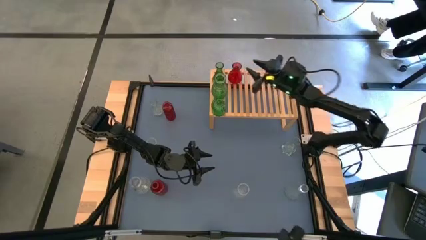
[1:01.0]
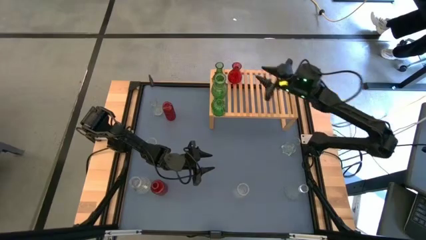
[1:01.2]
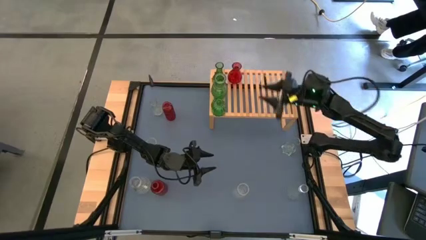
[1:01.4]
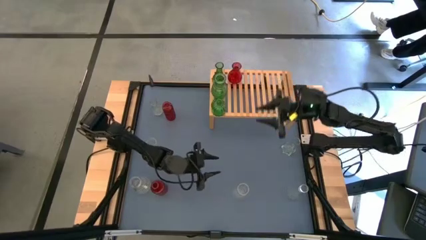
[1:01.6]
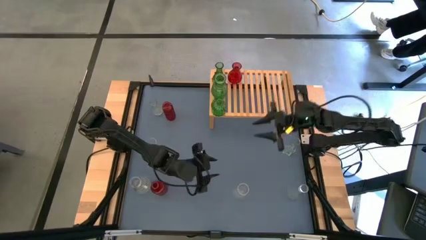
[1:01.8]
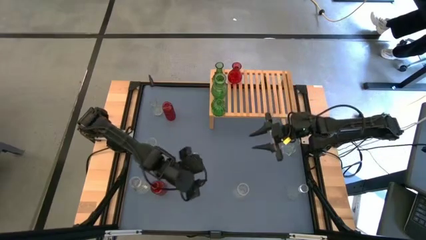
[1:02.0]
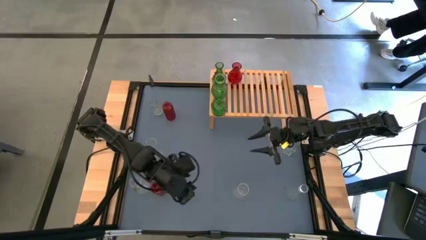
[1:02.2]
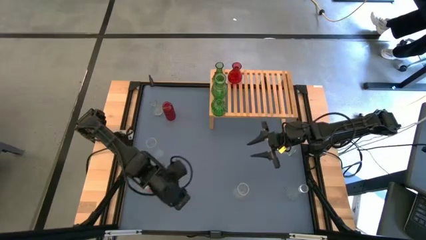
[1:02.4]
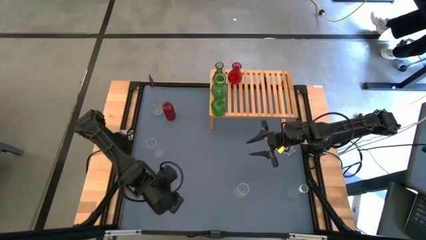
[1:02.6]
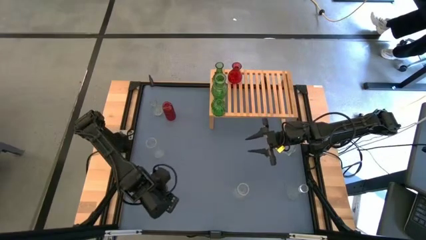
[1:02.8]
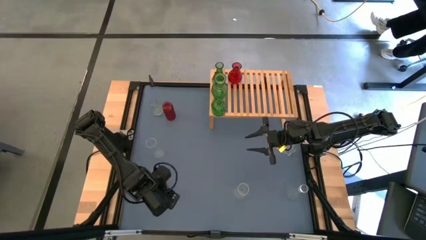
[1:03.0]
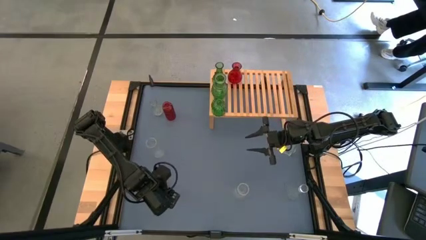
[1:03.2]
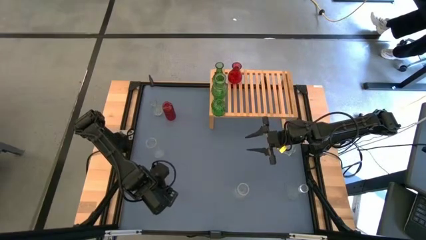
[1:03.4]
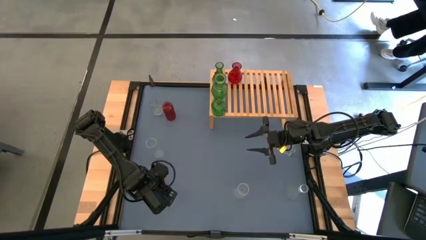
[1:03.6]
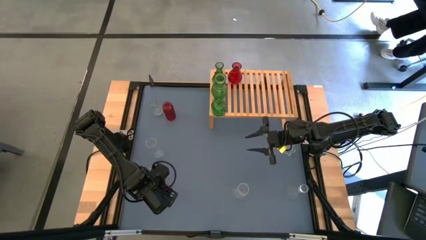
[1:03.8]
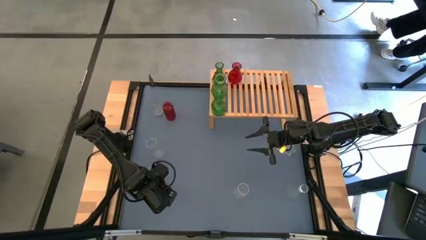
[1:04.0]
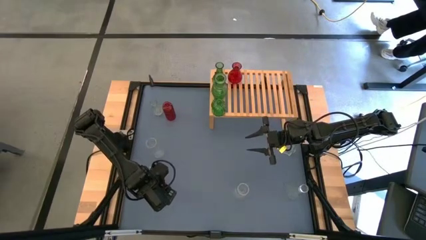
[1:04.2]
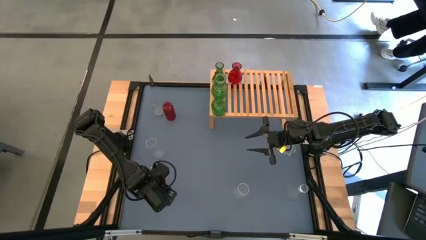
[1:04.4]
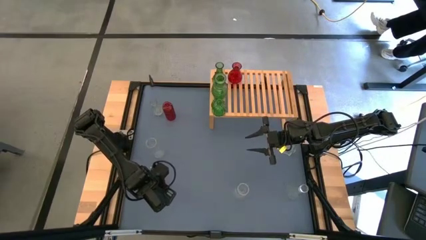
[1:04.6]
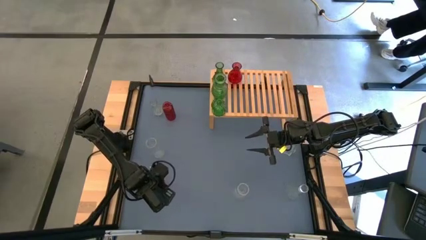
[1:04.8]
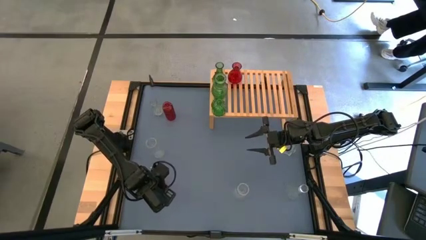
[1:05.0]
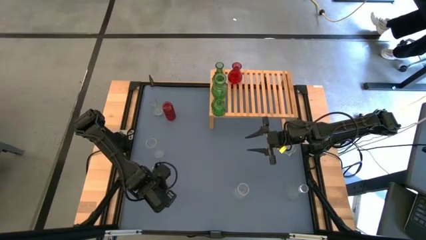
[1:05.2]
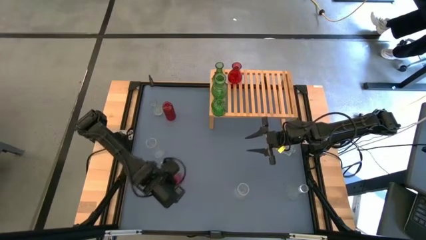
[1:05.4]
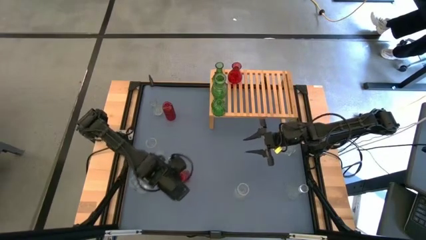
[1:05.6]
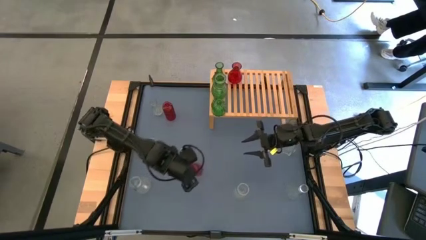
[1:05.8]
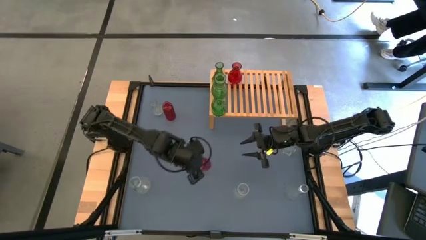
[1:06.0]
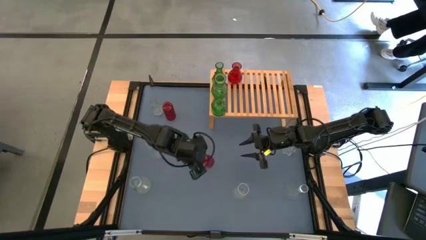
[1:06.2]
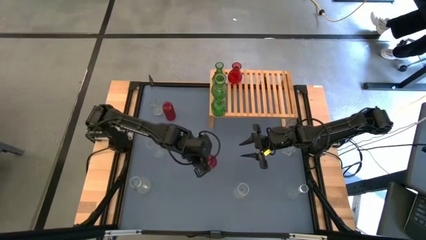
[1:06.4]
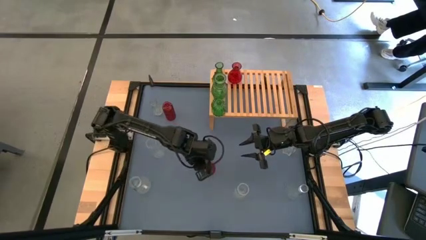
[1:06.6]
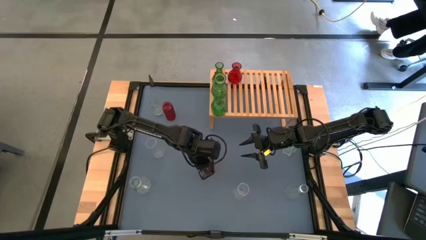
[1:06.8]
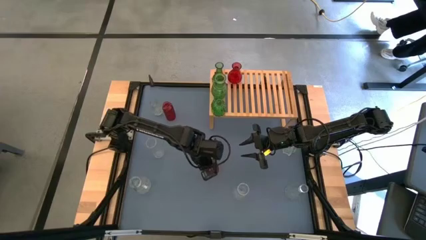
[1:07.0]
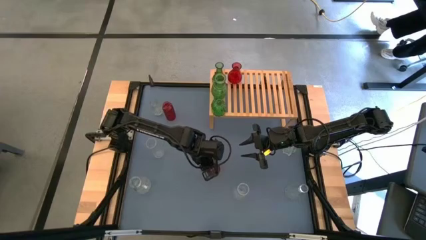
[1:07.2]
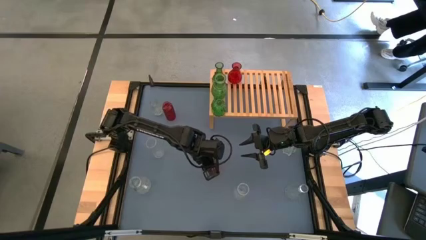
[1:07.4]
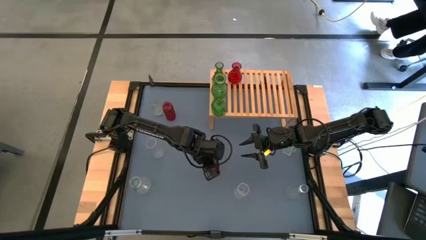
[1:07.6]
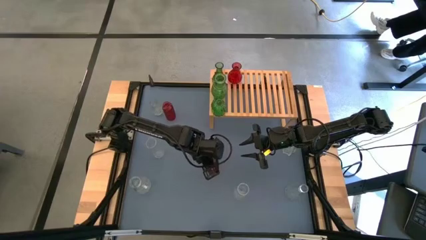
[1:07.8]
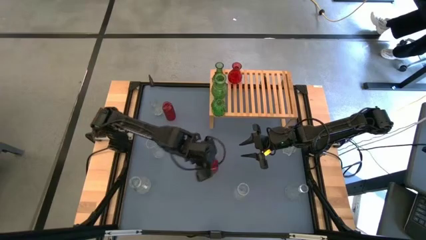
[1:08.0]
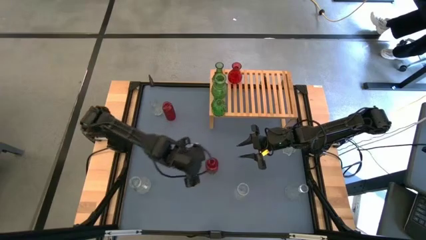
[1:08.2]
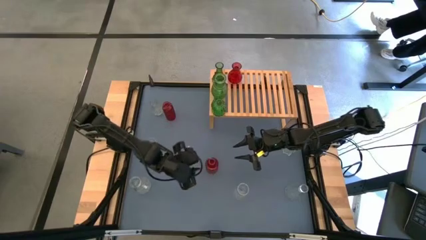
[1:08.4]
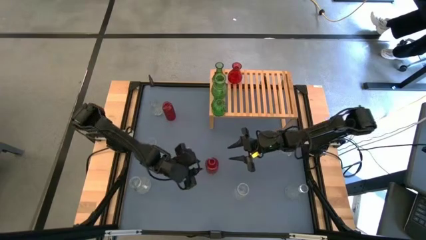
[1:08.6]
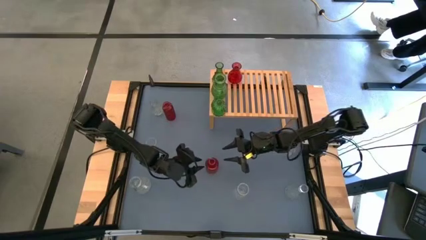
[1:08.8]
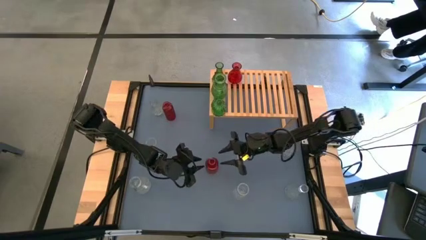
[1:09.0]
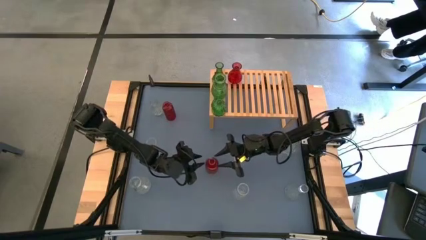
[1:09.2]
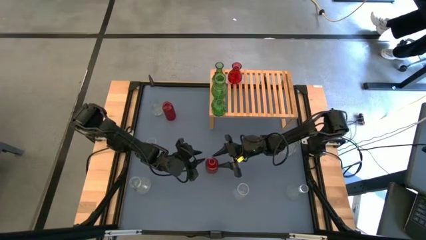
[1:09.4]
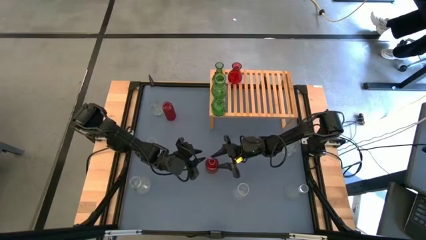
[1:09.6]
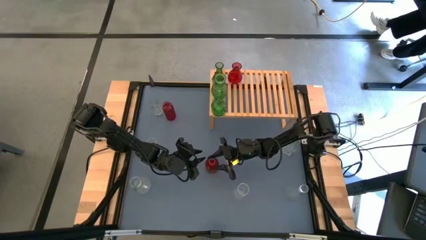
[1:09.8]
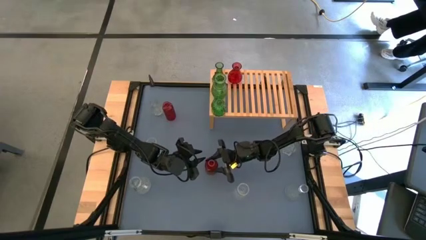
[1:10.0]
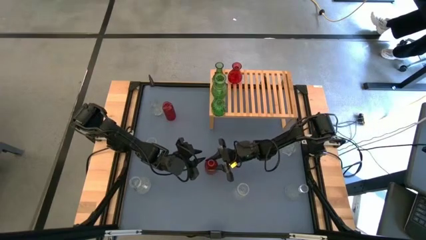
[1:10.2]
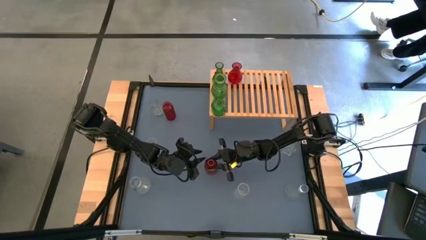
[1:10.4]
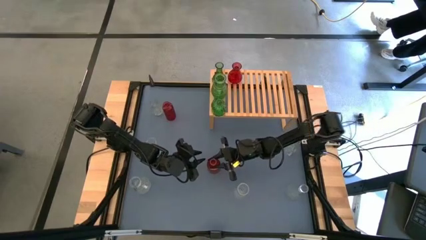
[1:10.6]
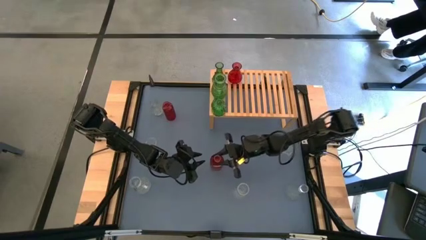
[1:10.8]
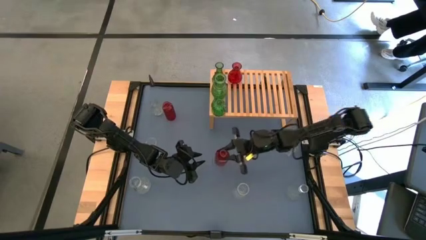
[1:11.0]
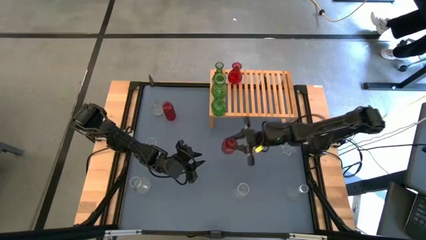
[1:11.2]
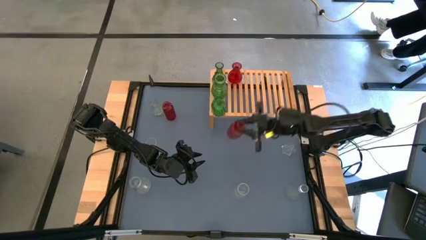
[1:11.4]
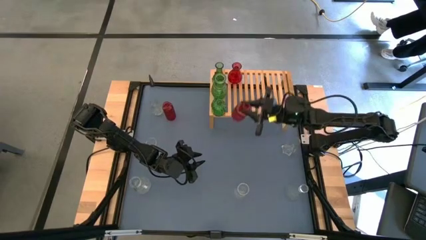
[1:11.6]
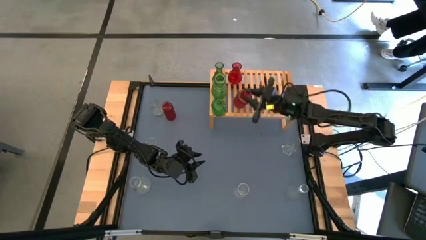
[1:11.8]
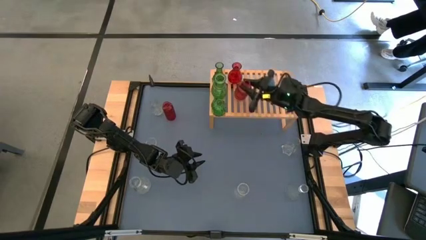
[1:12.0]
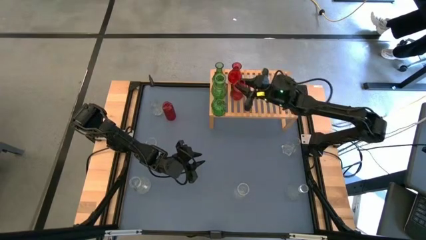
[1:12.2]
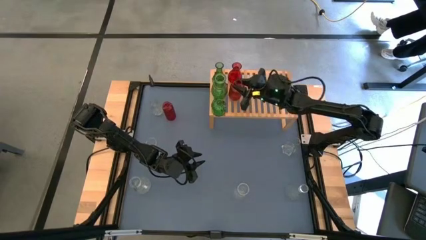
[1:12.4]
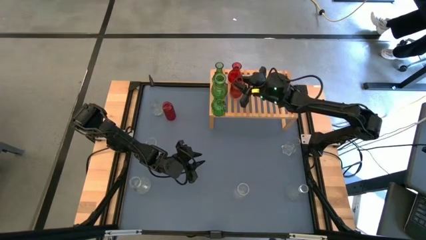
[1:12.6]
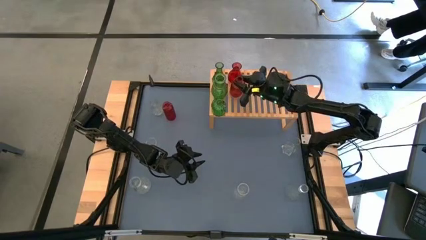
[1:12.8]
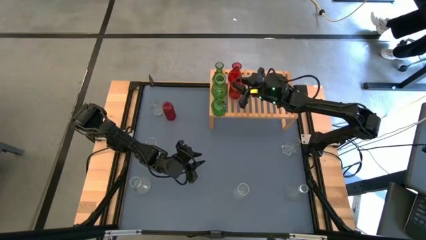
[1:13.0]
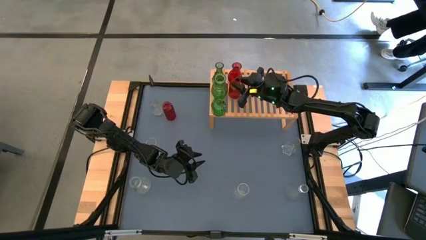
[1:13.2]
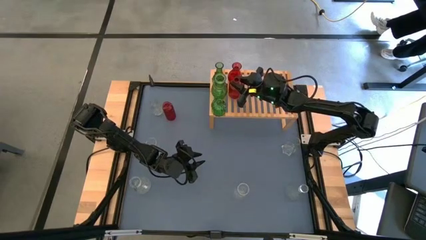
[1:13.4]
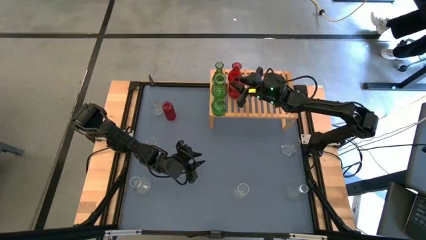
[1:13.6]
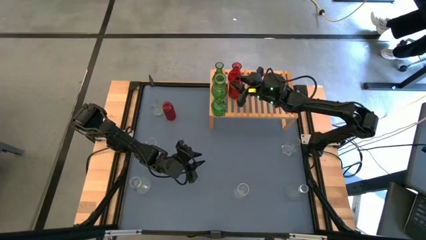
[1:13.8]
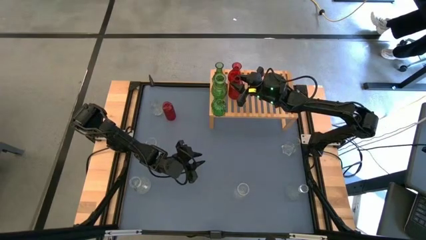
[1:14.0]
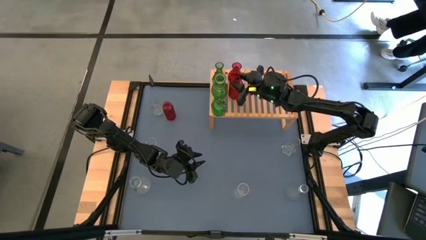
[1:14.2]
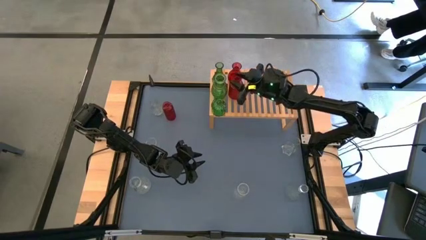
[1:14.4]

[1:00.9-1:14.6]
Task: sort vases onto shelf
Put the bottom red vase on the shelf, aligned with the other red vase
